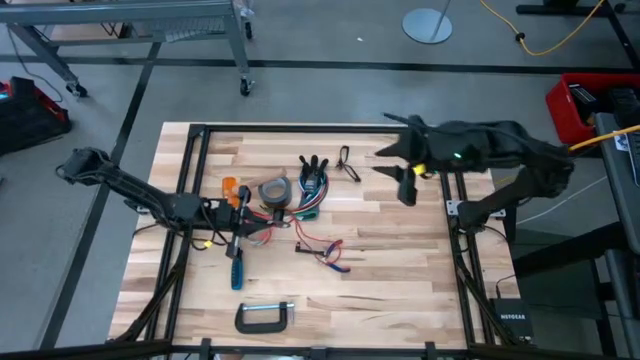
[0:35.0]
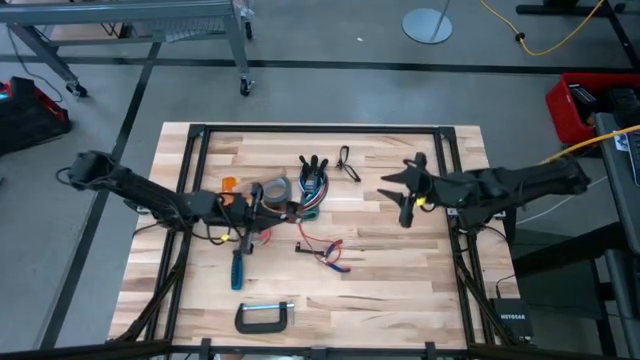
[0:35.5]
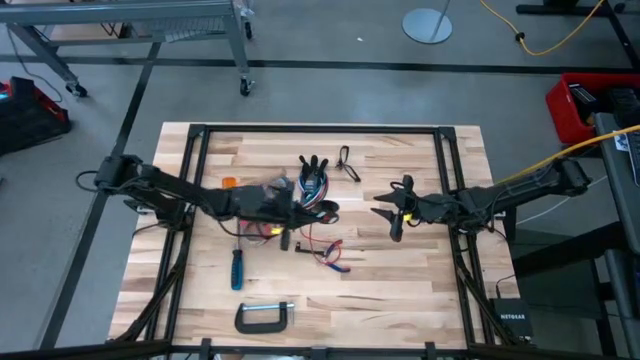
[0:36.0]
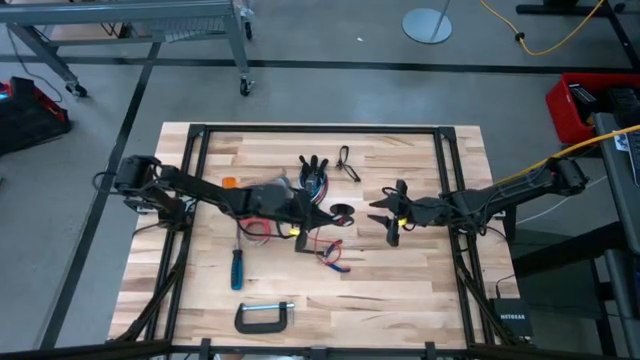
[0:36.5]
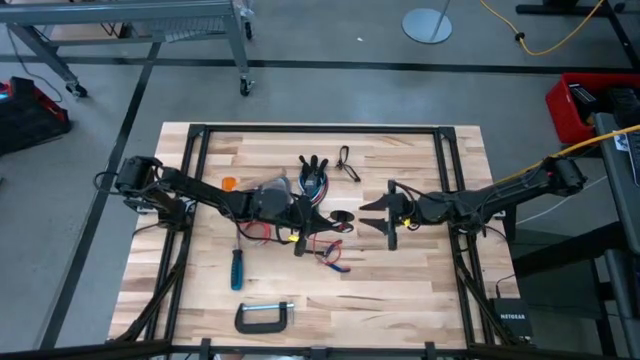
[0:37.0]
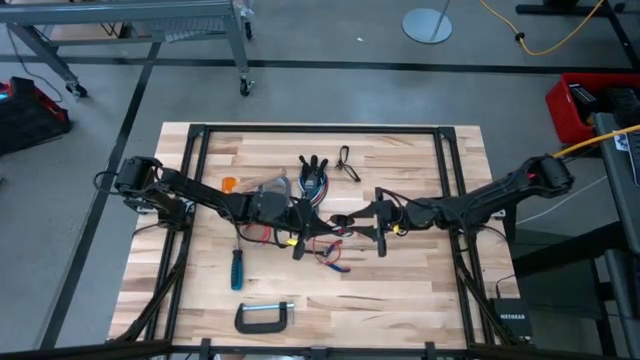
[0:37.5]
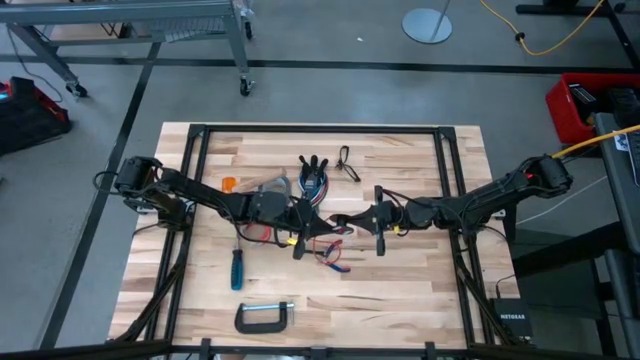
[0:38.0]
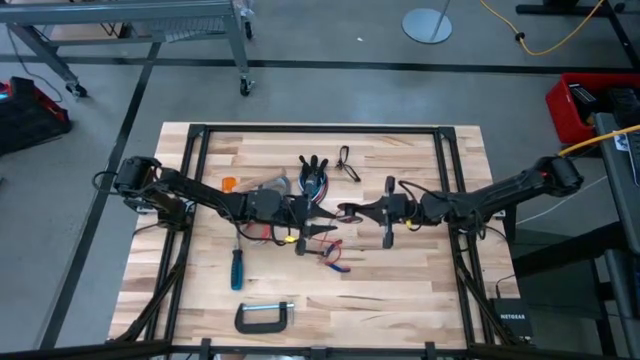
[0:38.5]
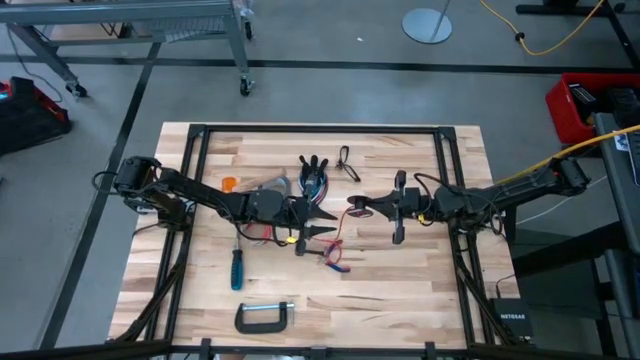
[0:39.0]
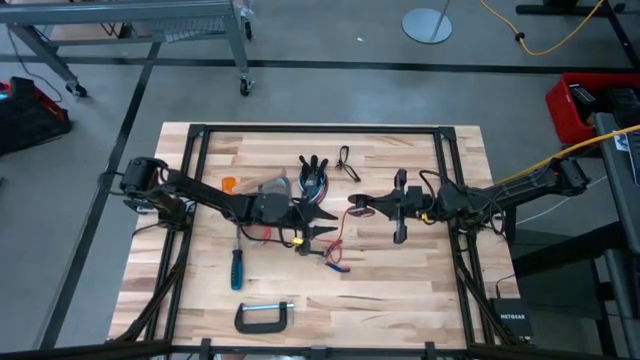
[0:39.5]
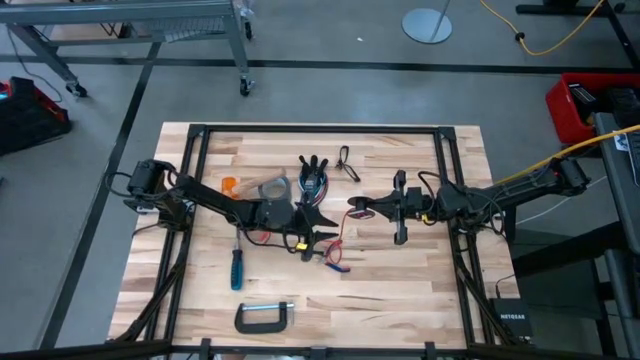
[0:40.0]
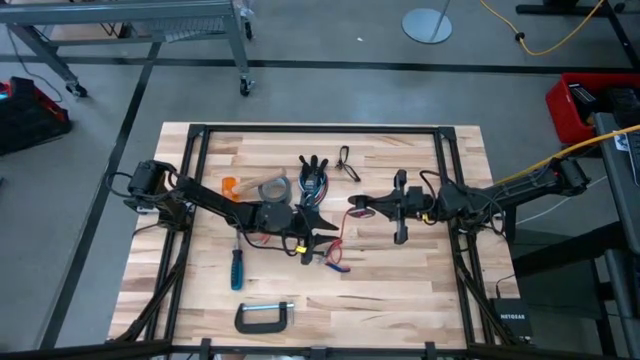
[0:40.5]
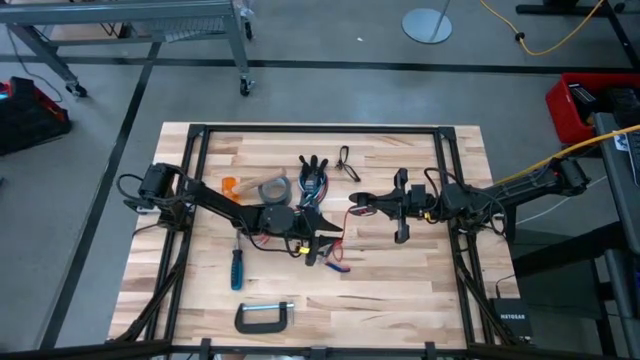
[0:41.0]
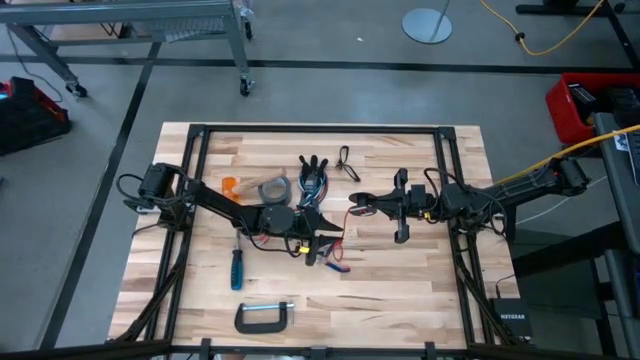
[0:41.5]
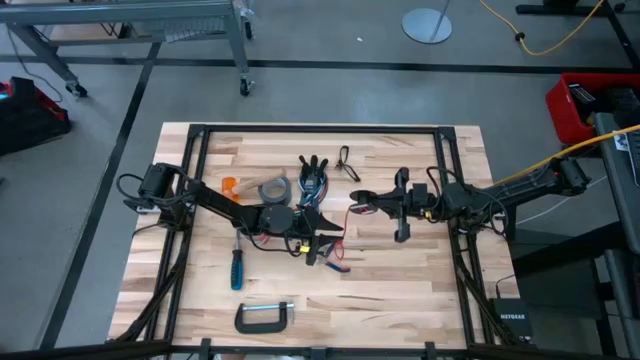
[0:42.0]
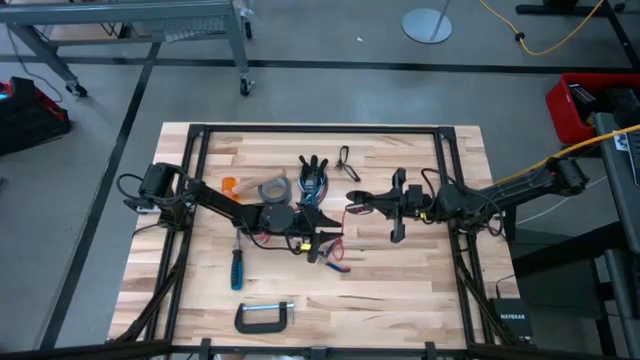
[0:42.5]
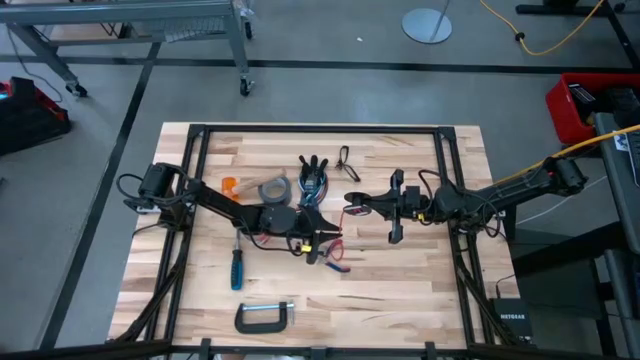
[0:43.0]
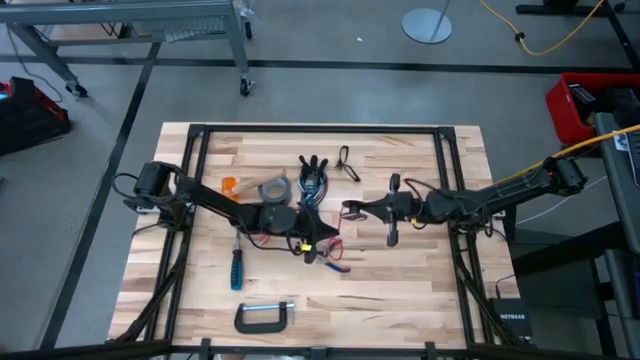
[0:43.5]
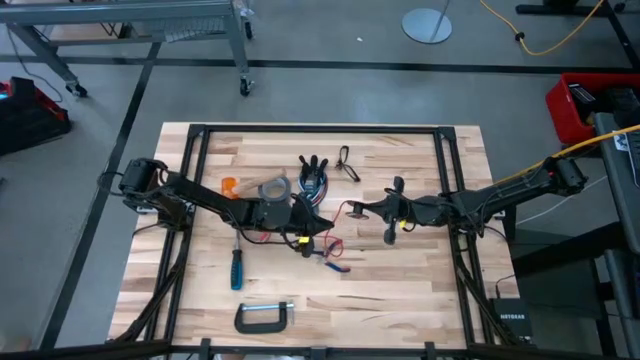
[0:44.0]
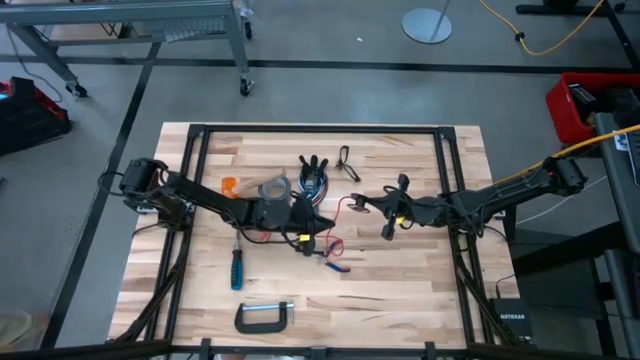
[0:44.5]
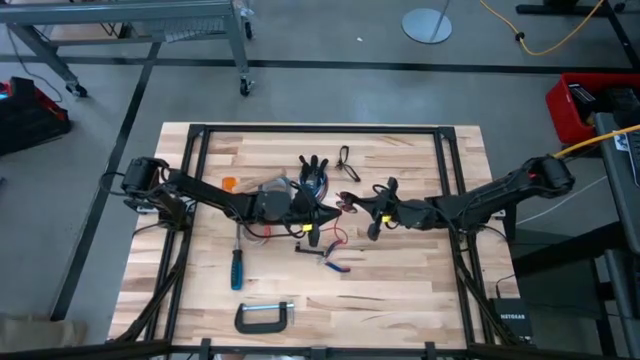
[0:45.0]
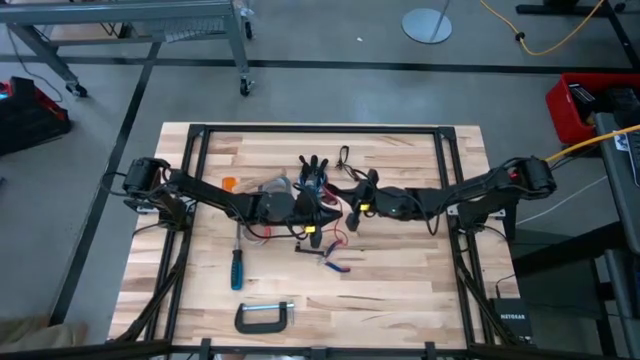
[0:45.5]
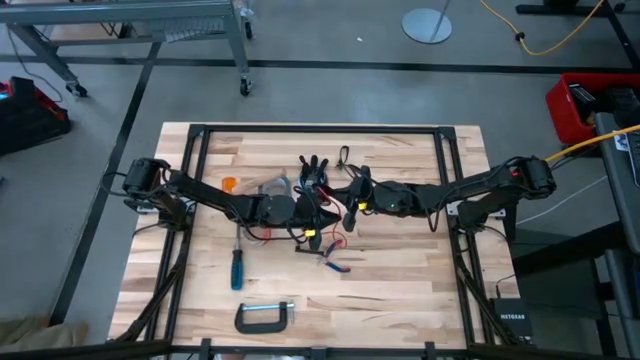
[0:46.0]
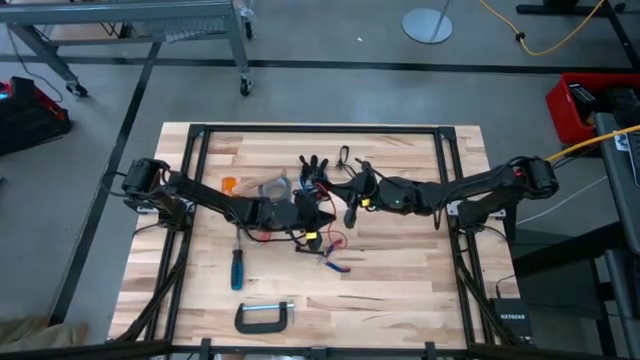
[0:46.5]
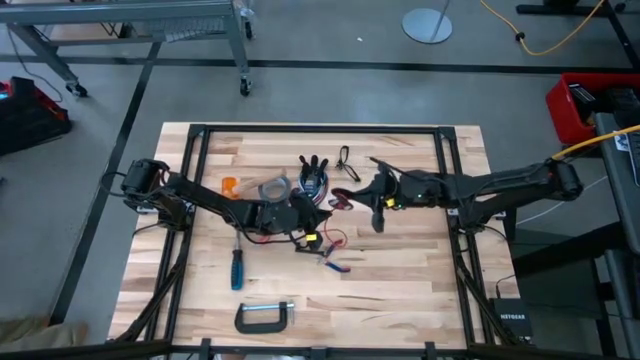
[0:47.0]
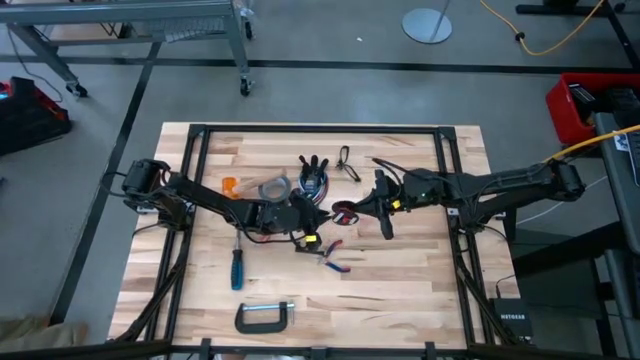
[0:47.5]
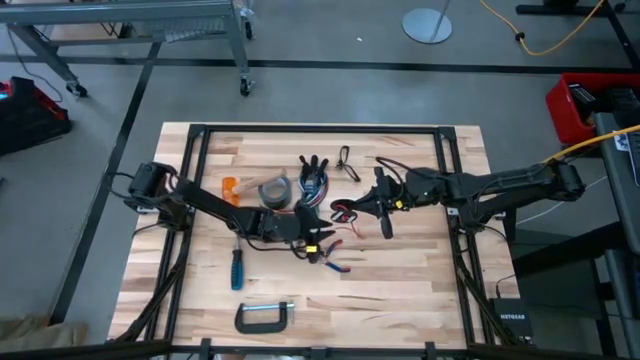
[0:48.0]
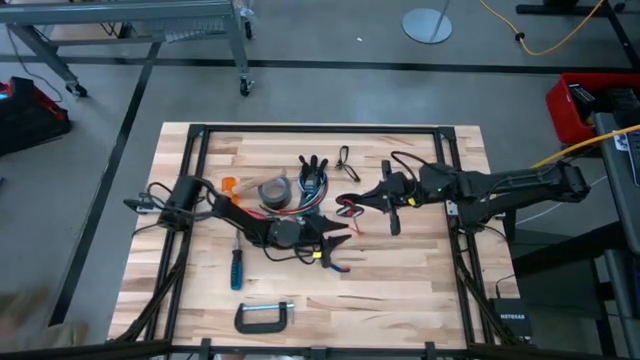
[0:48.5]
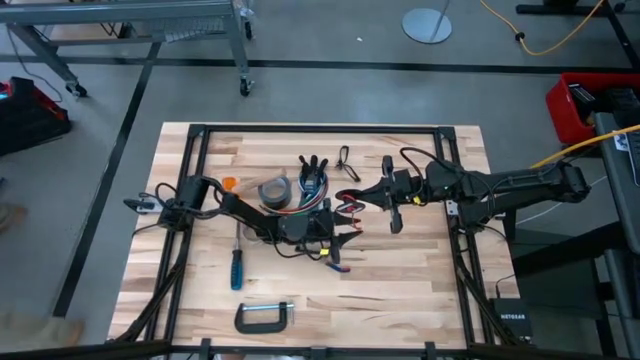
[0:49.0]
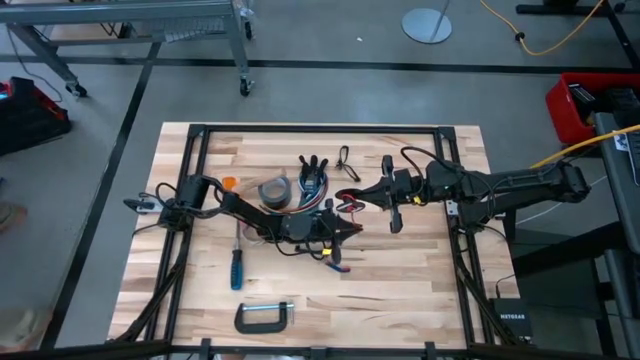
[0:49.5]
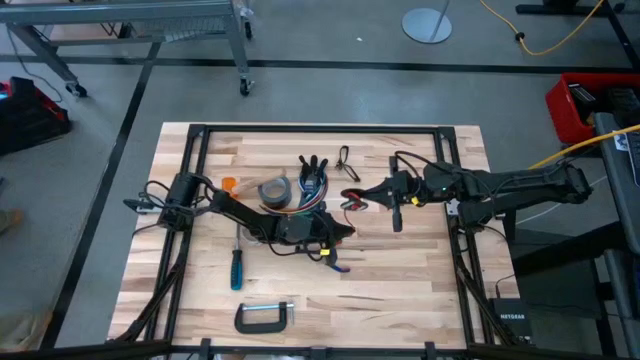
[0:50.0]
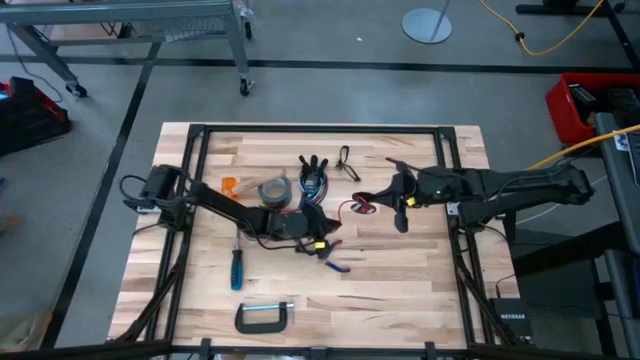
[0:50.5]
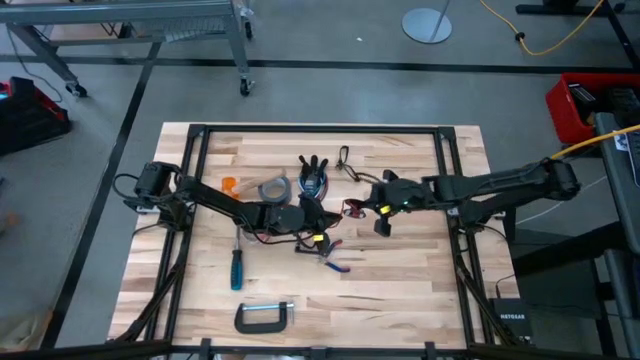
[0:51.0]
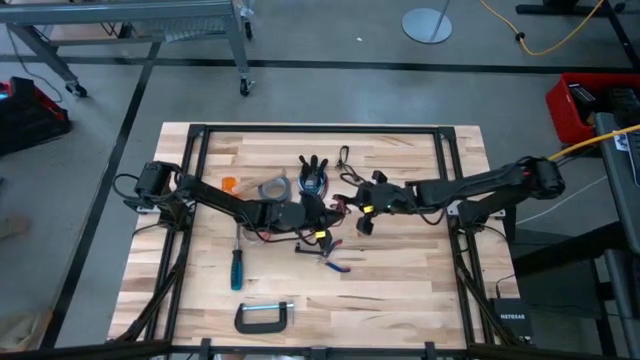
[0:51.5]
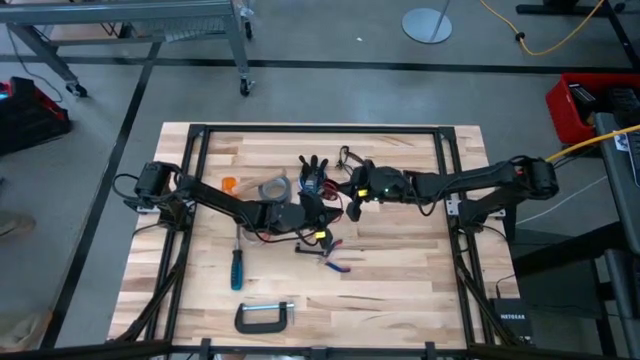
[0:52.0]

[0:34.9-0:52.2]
Task: Coil cords
Coil the red wire onto the black spool
